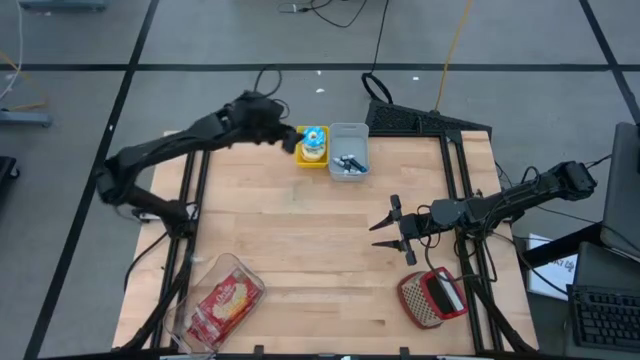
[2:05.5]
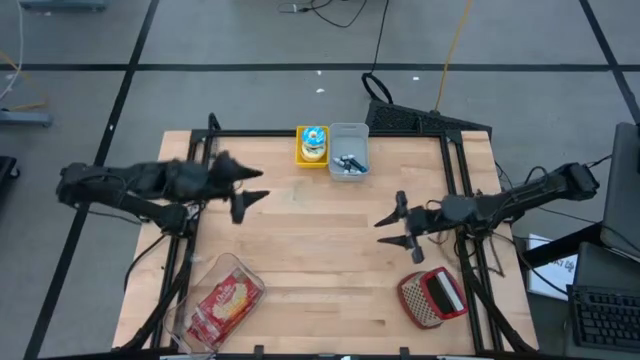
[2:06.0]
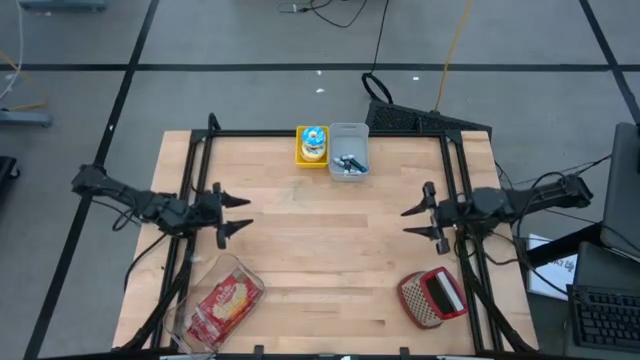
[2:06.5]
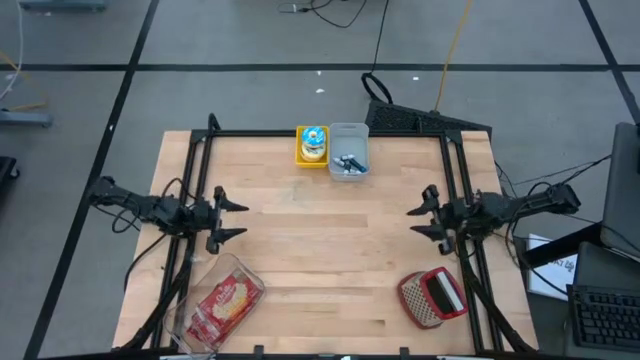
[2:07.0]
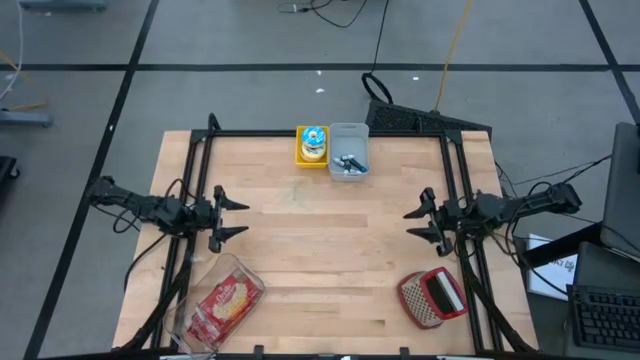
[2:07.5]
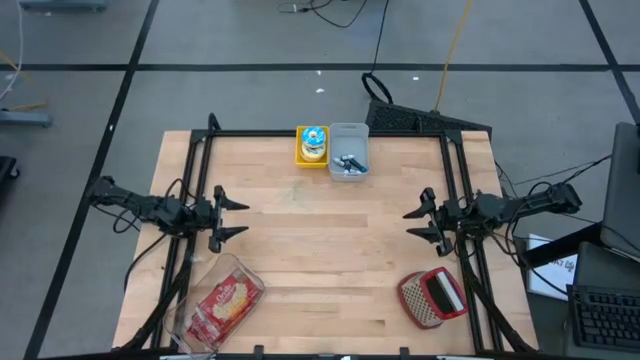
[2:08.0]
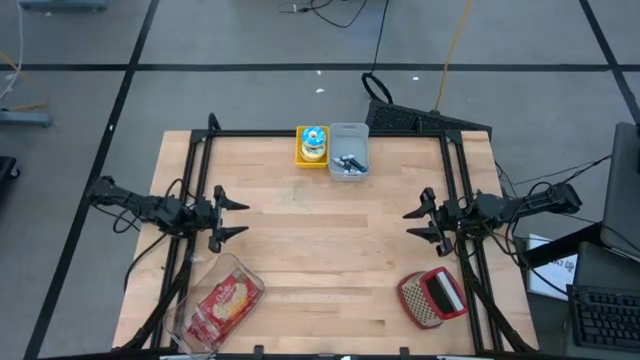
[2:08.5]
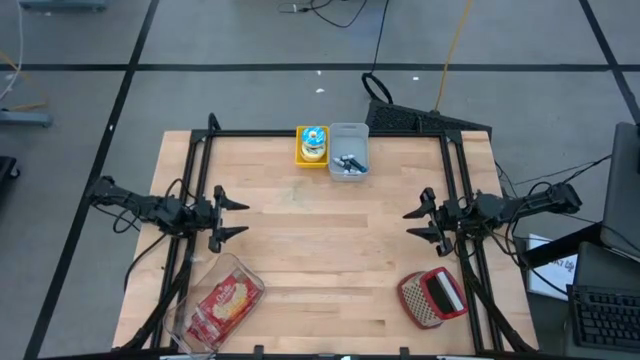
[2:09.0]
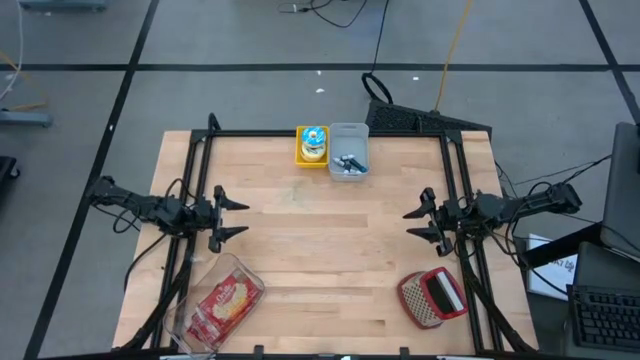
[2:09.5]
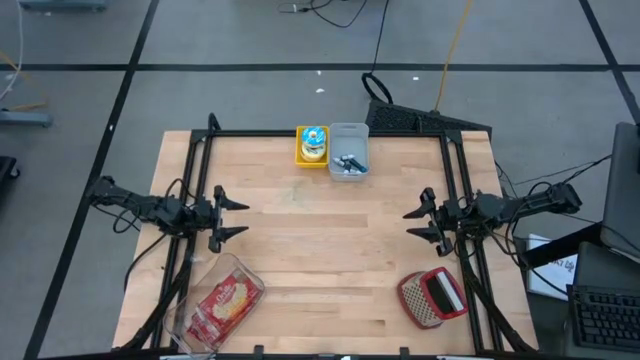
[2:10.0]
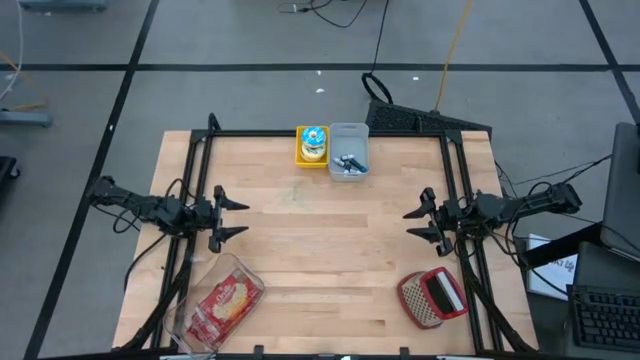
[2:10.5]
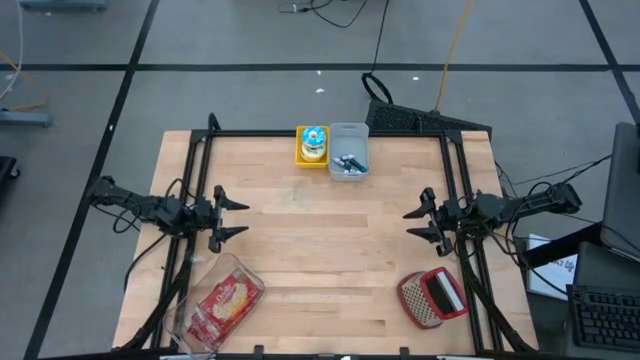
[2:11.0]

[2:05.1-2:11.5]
Return to Home Position
